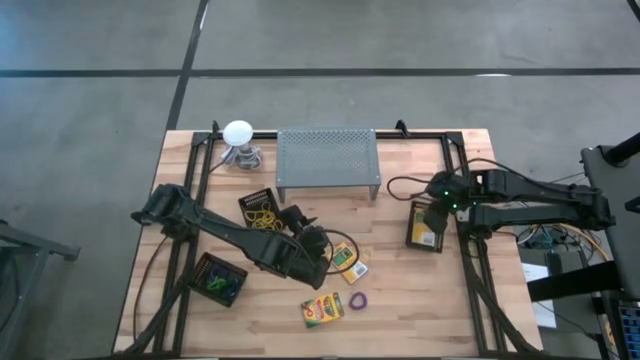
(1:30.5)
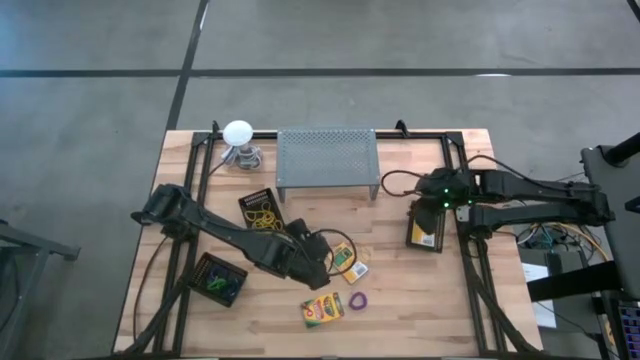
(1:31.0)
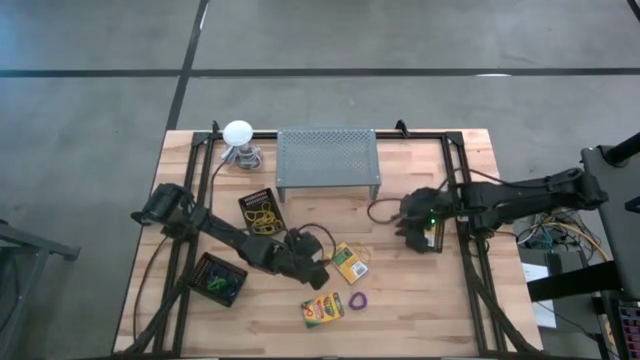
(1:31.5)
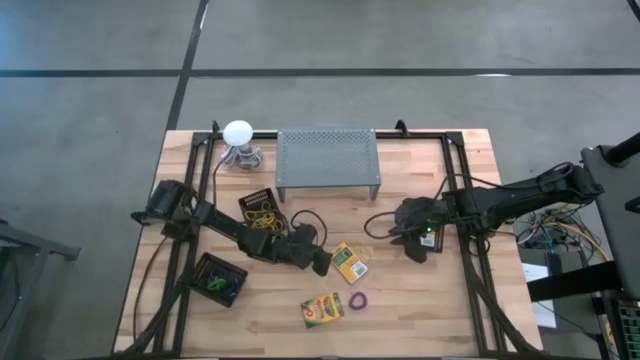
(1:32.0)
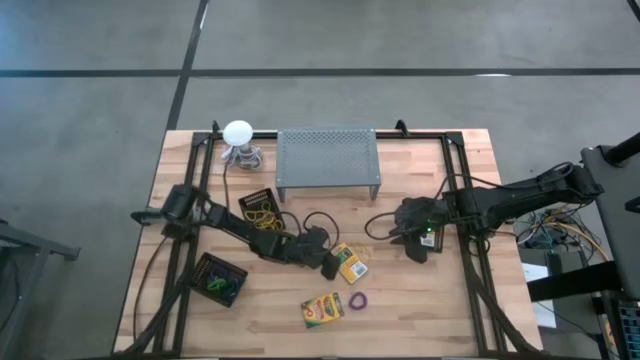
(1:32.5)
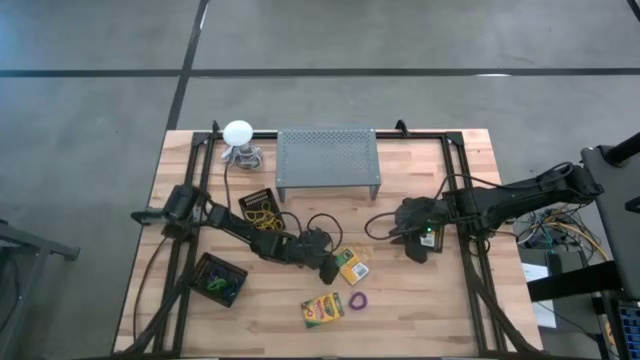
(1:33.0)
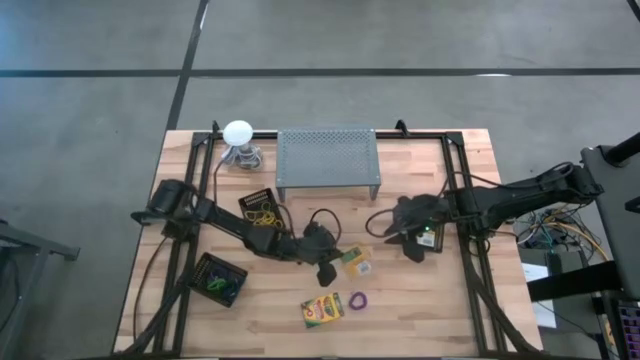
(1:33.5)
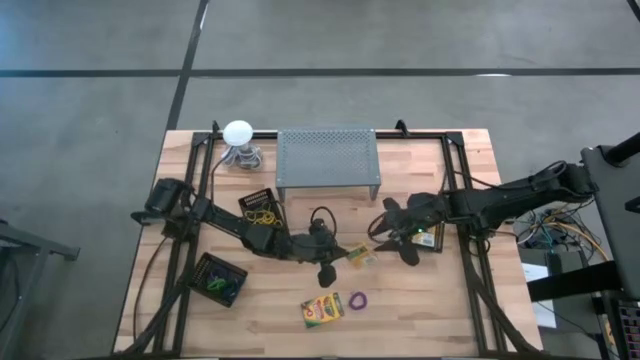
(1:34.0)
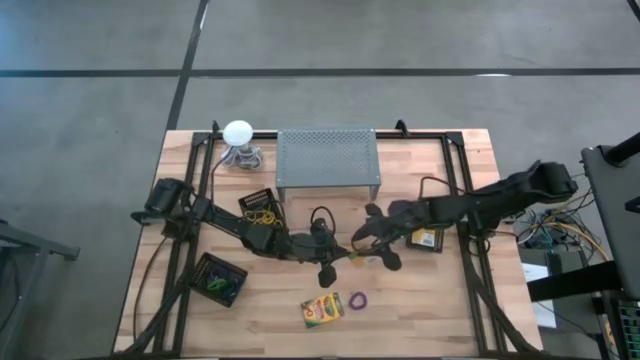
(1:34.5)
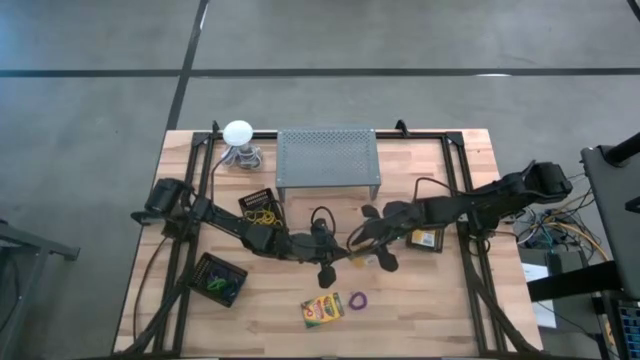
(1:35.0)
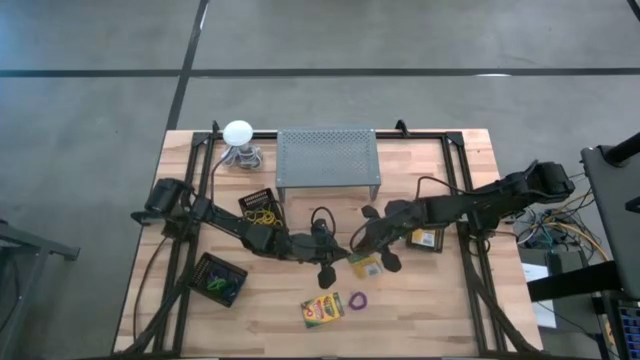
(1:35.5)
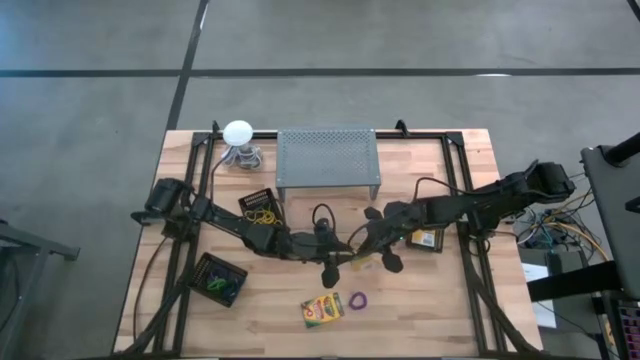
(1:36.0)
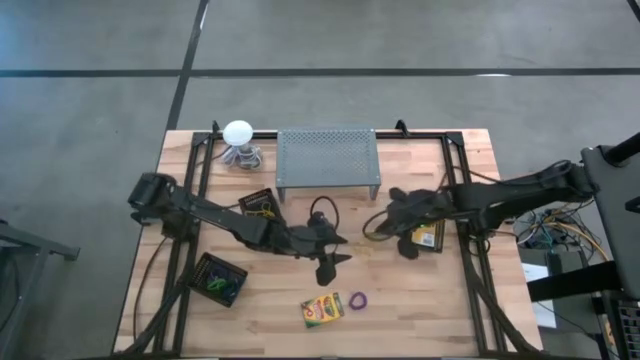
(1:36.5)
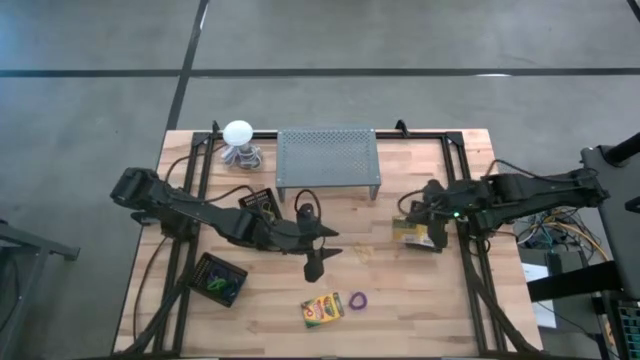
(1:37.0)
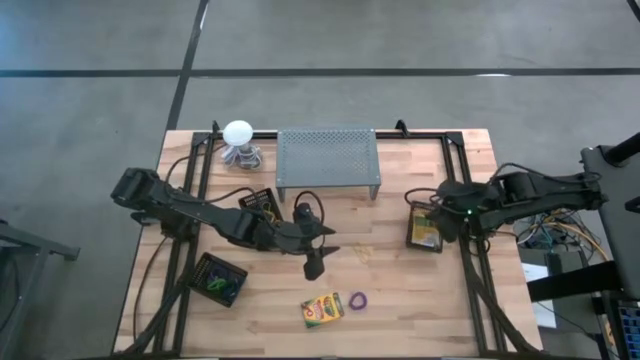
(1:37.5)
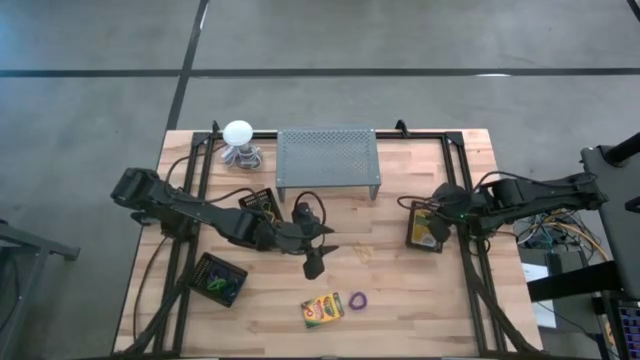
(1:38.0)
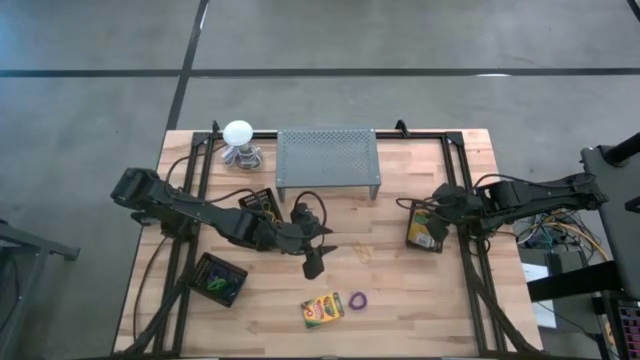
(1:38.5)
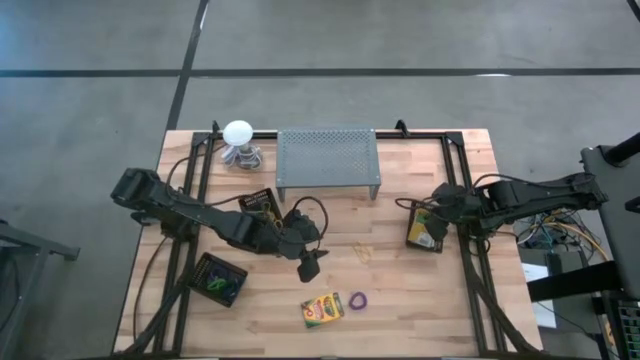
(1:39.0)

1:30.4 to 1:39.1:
Task: Pick & Place Office Desk Supplies
Put the crayon box into the top right black bin

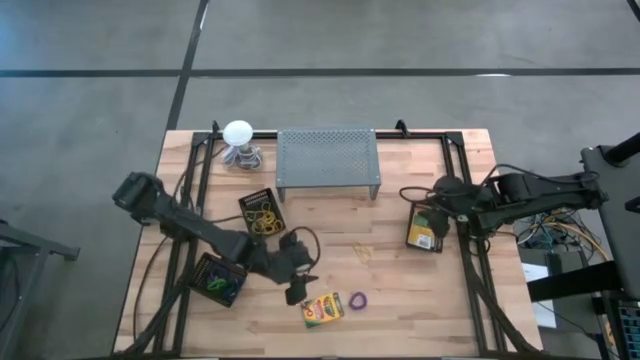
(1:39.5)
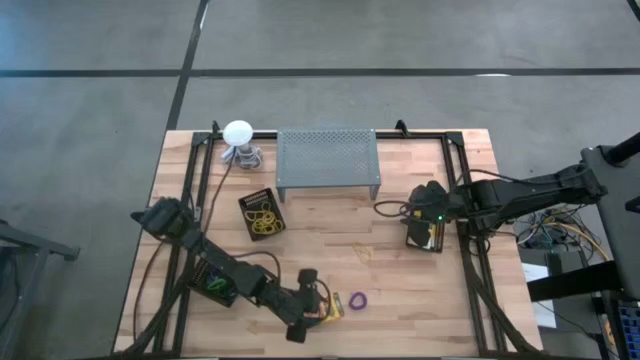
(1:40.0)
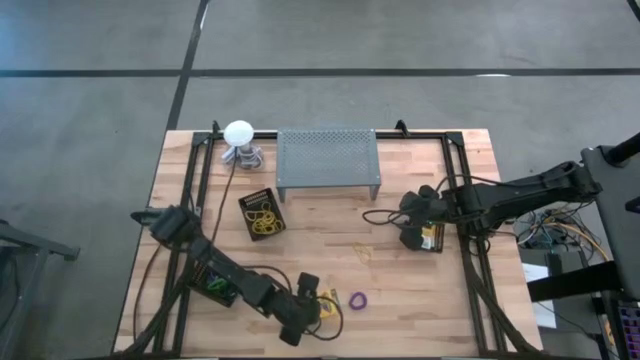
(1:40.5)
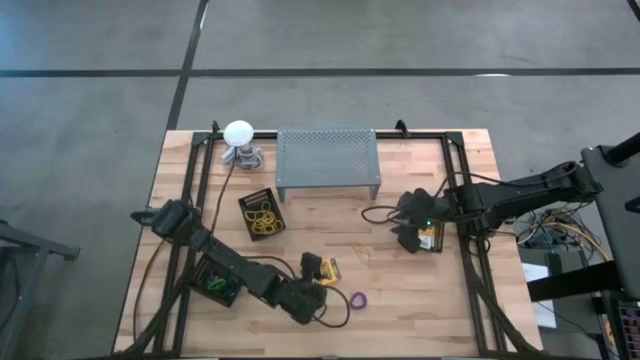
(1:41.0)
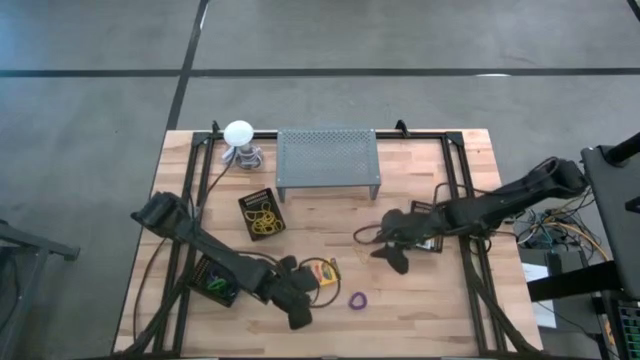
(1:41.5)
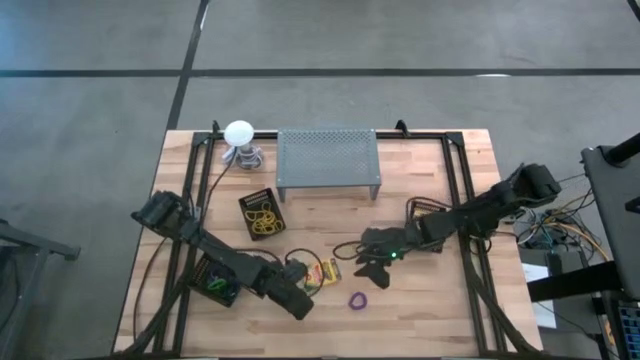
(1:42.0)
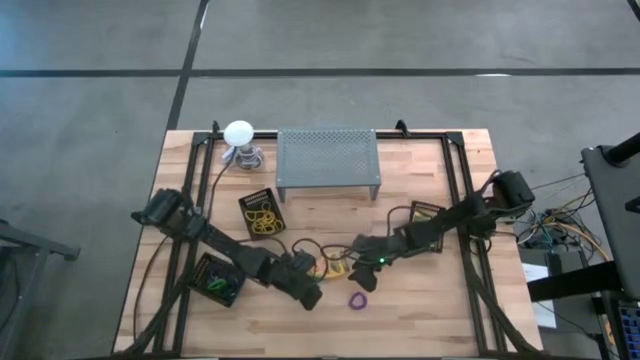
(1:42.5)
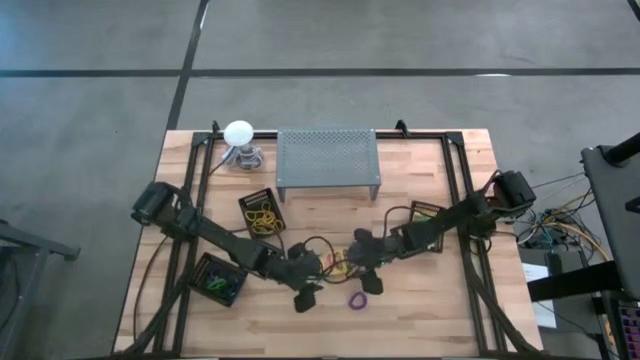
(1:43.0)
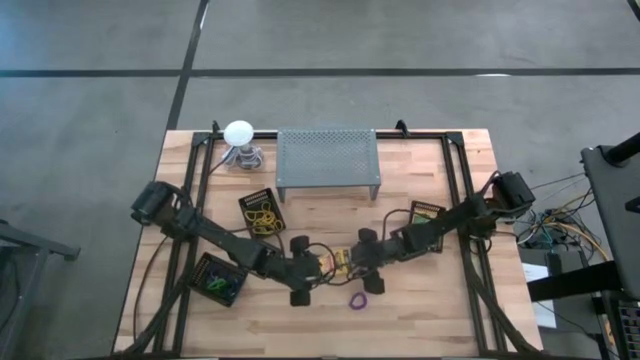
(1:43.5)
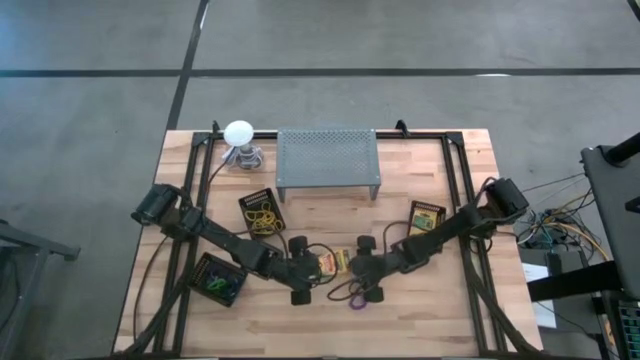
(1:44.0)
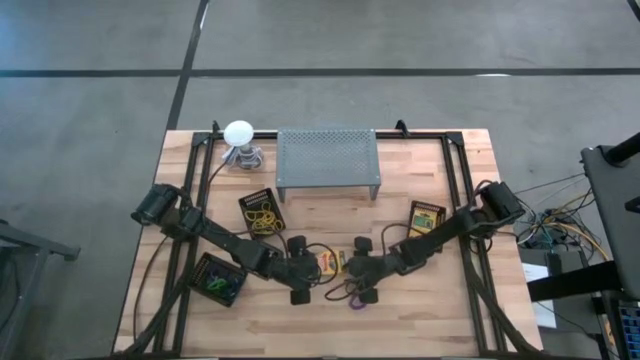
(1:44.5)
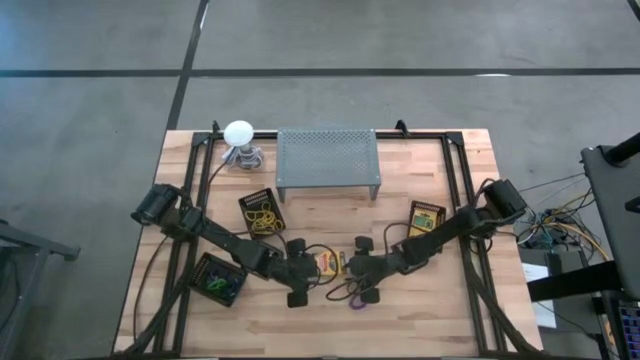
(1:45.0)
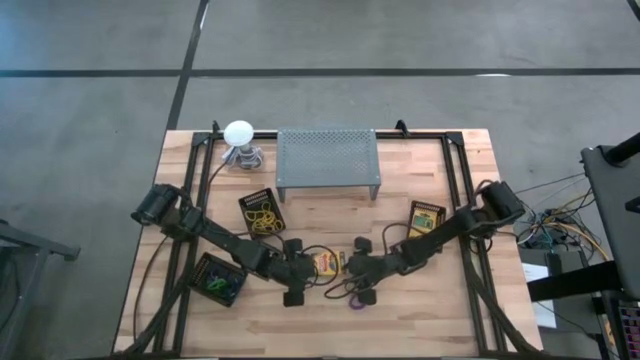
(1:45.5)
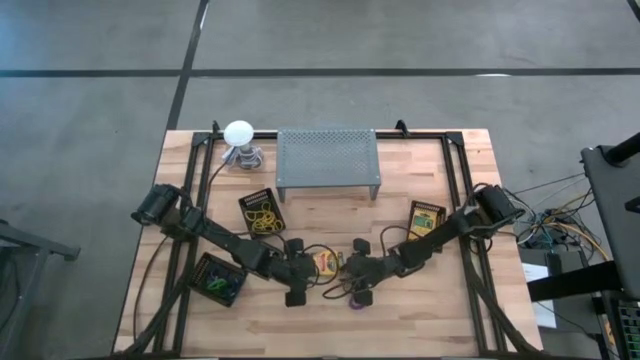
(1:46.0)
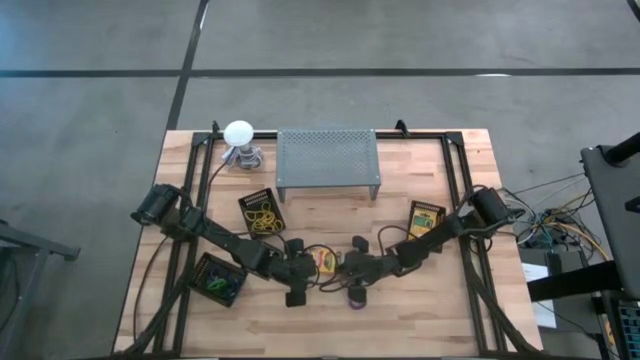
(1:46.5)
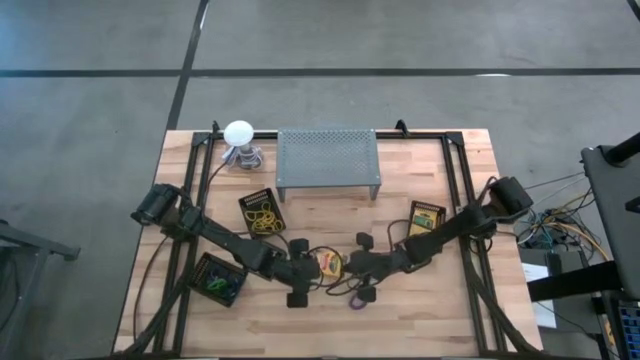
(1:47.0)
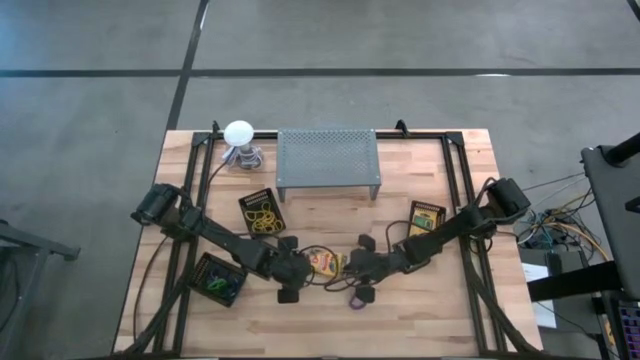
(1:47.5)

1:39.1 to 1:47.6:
Put the crayon box into the top right black bin

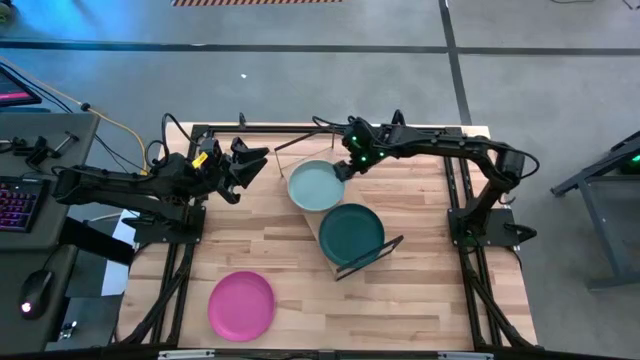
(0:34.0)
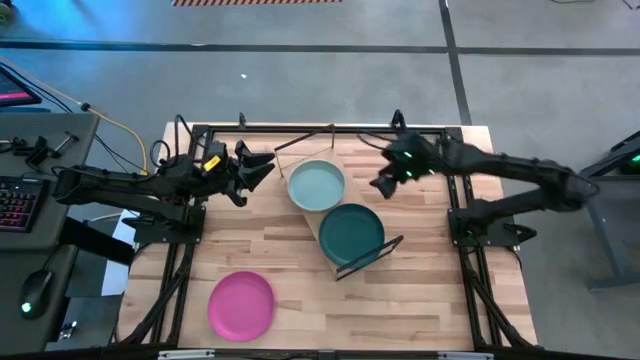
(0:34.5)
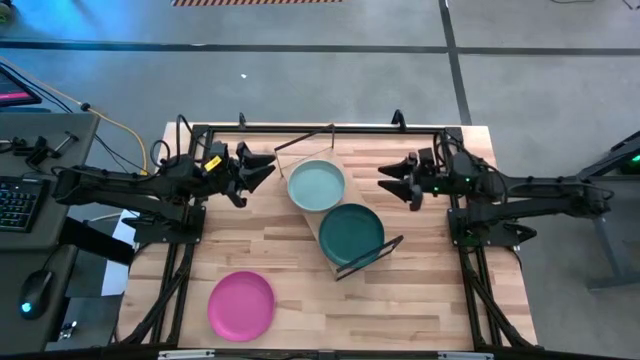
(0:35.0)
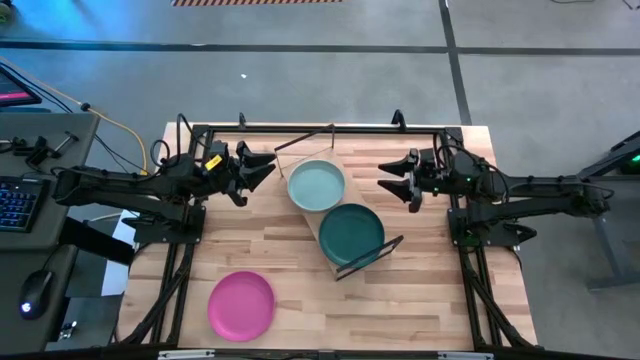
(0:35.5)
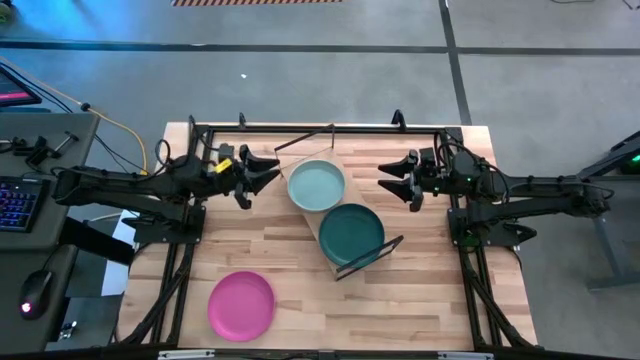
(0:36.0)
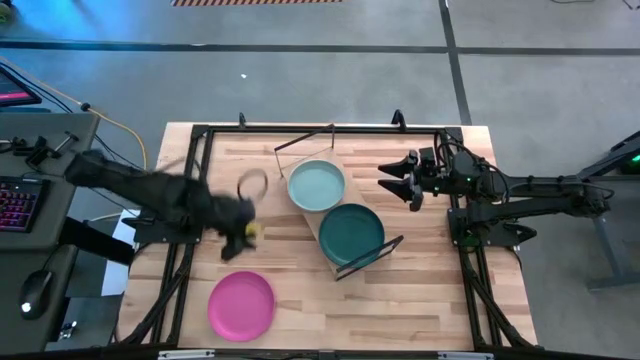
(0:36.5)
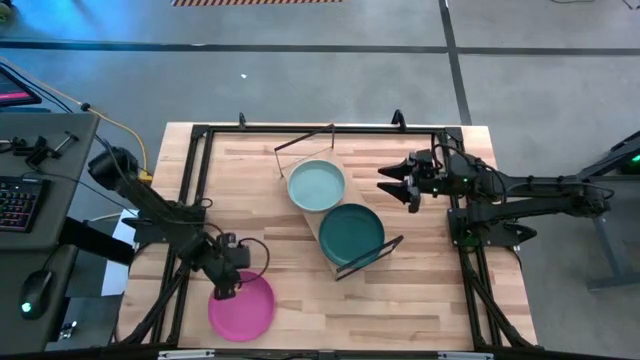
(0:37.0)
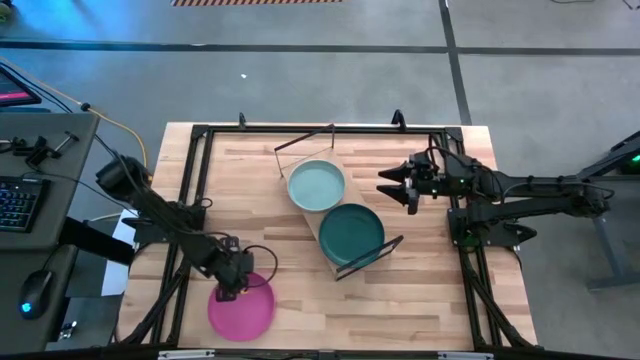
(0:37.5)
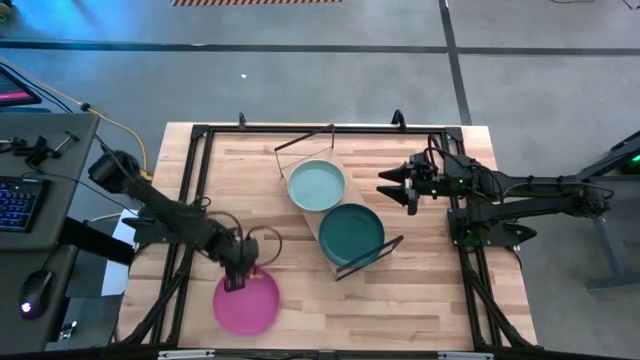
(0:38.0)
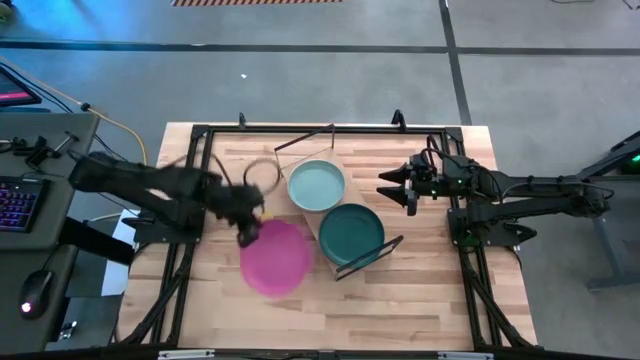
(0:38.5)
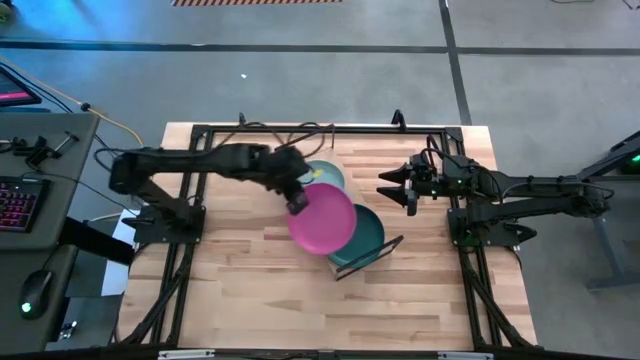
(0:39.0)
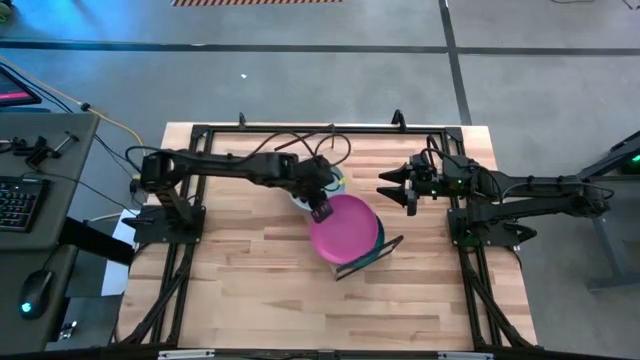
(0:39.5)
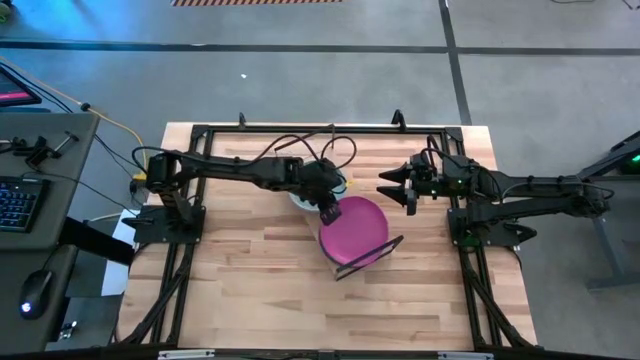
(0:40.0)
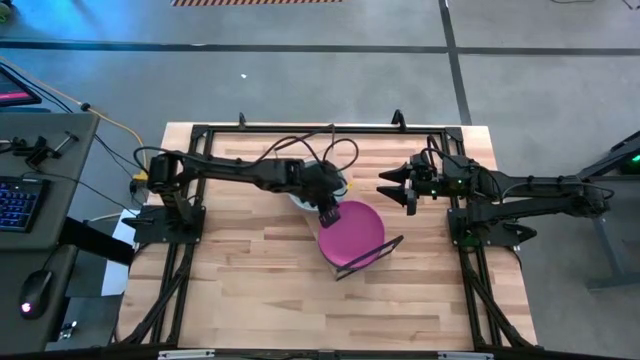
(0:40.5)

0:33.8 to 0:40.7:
Task: Place and stack plates onto a shelf
Stack the pink plate on top of the dark green plate on the shelf
